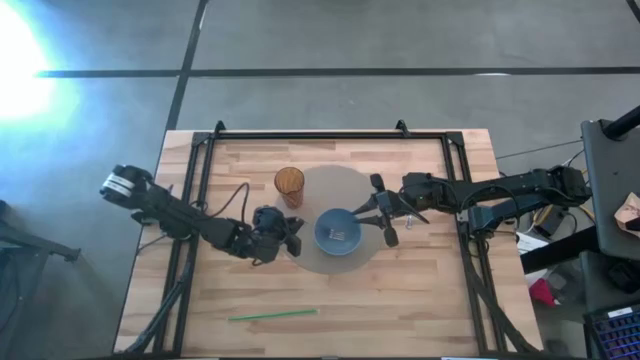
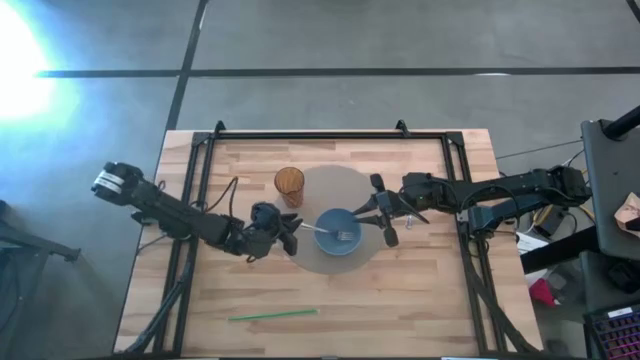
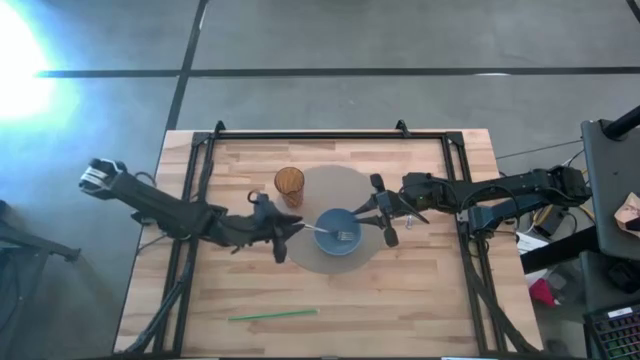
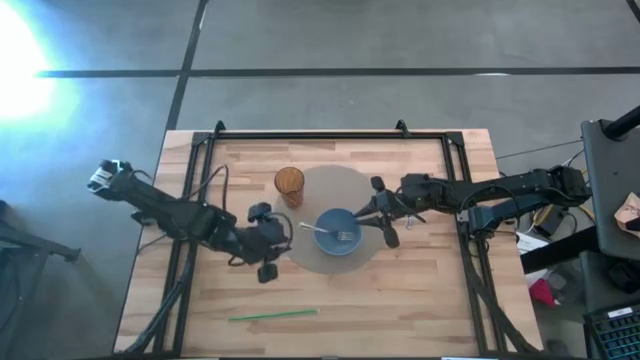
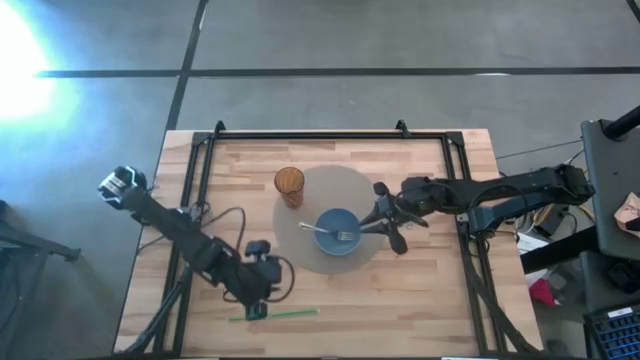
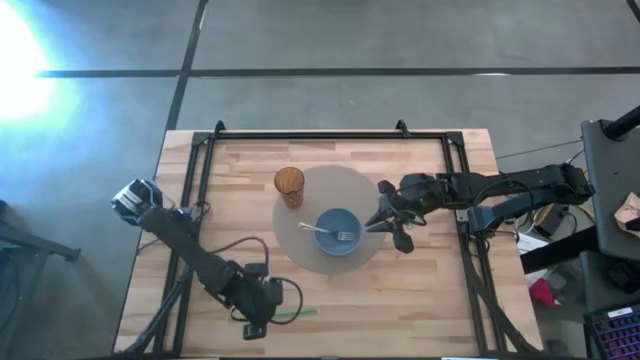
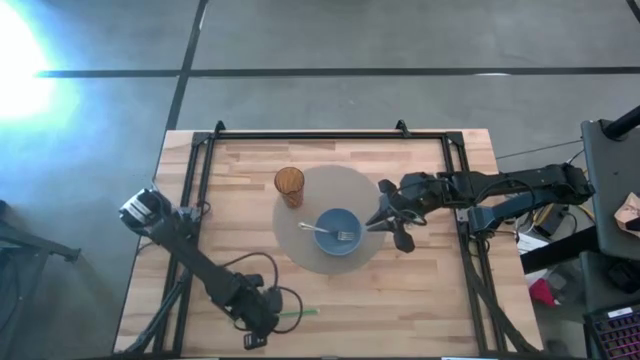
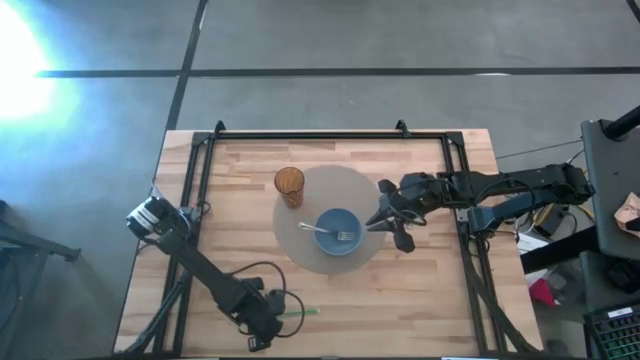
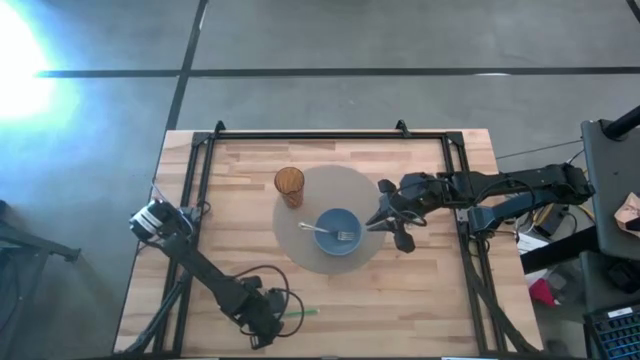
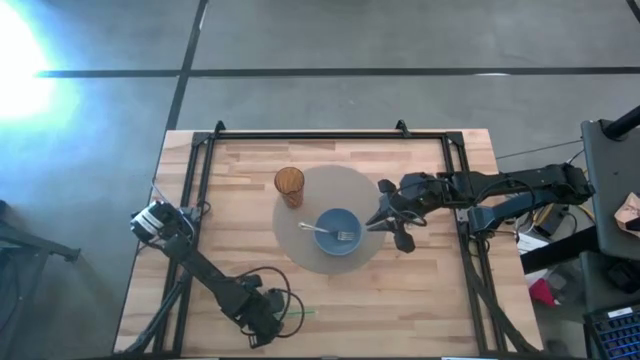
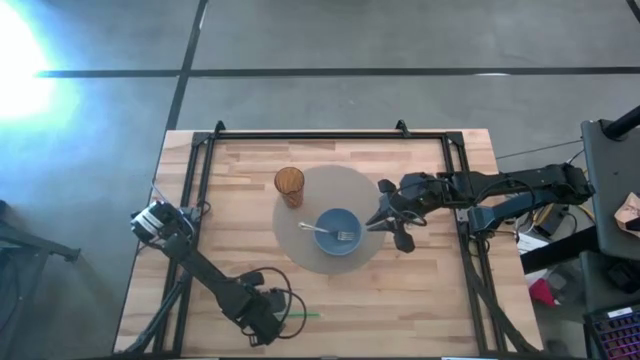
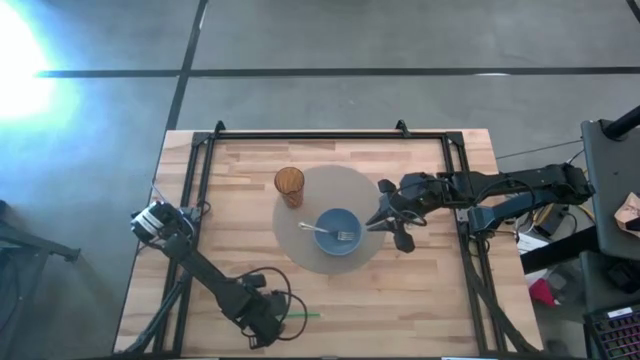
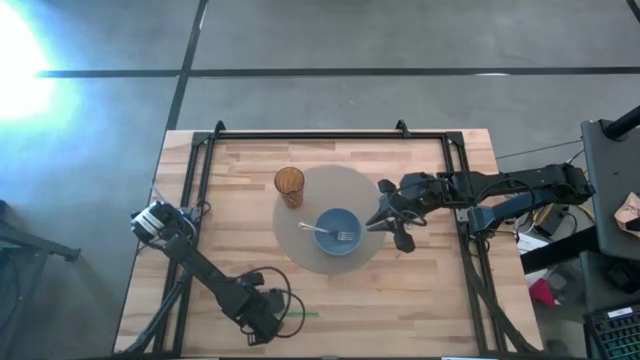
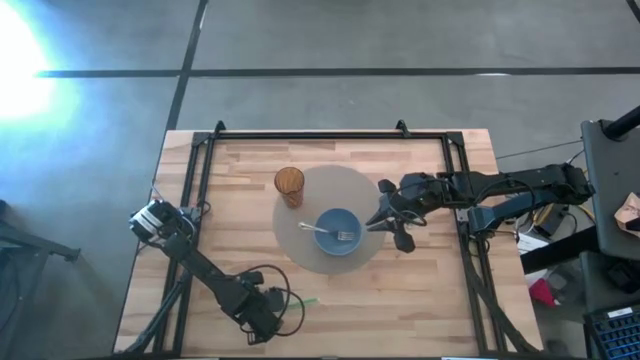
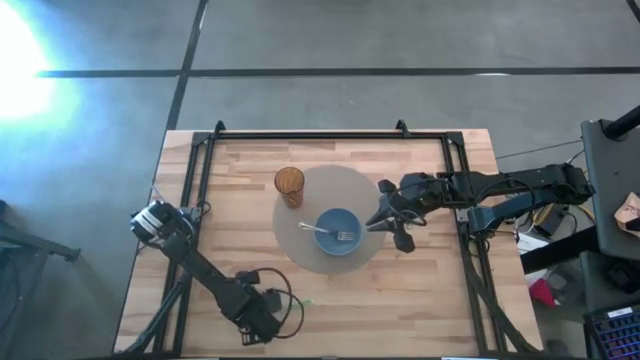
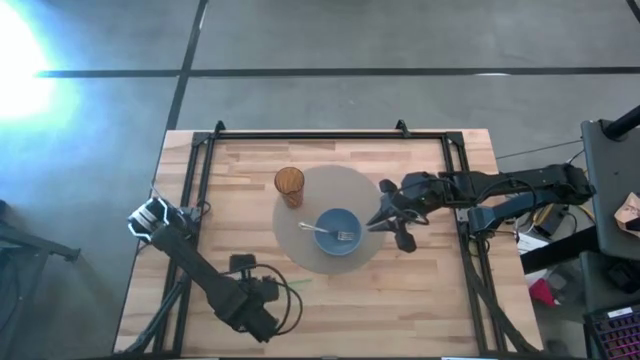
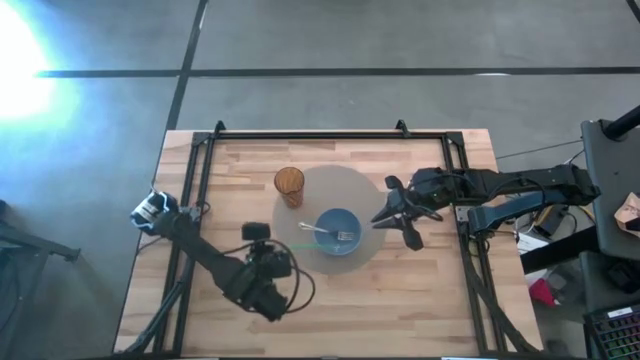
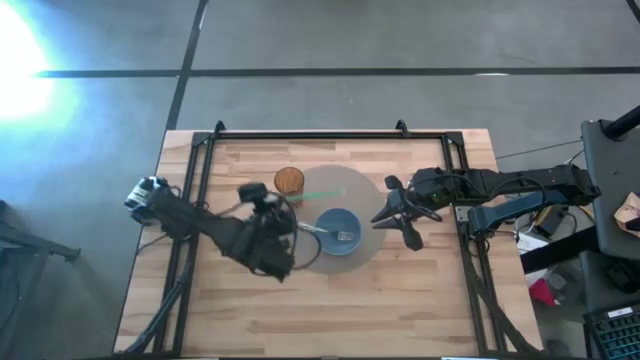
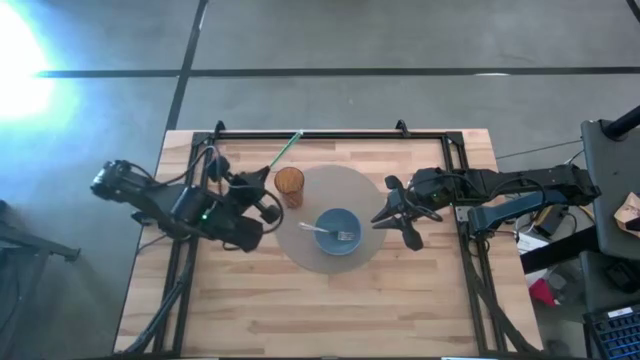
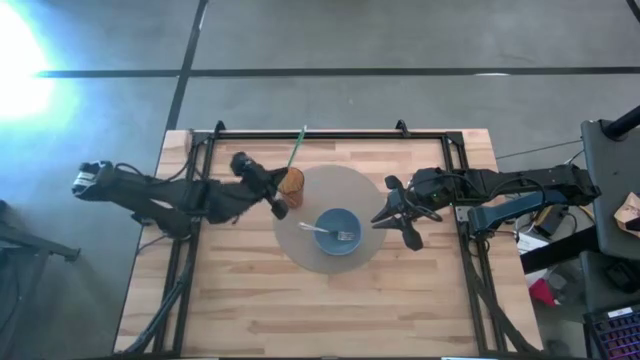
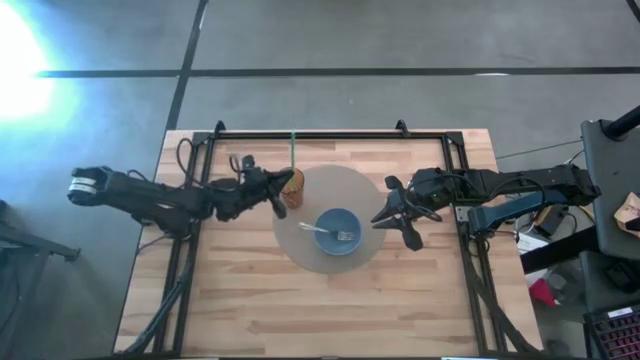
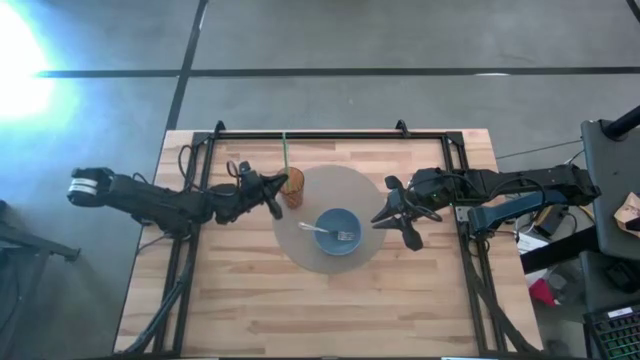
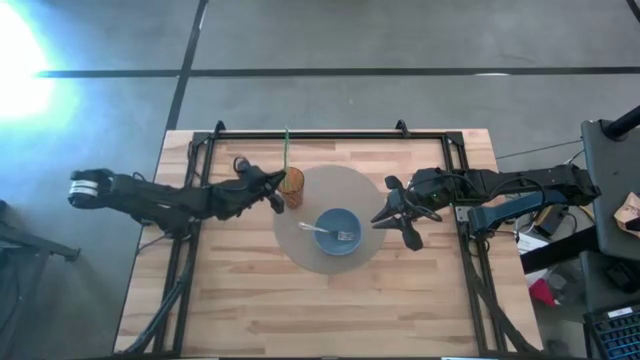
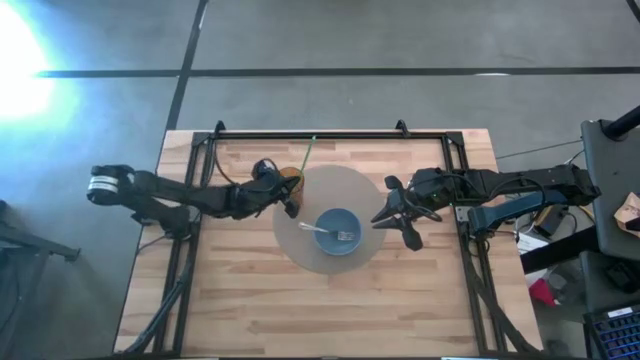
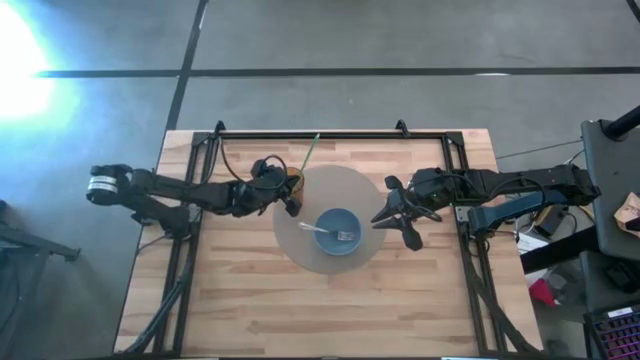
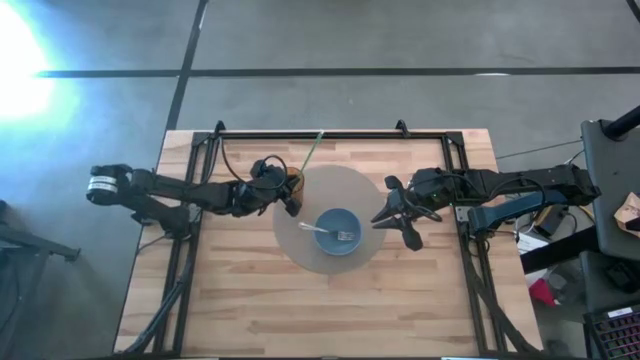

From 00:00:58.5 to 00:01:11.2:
Task: Pick & Place Utensil
Put the straw into the cup

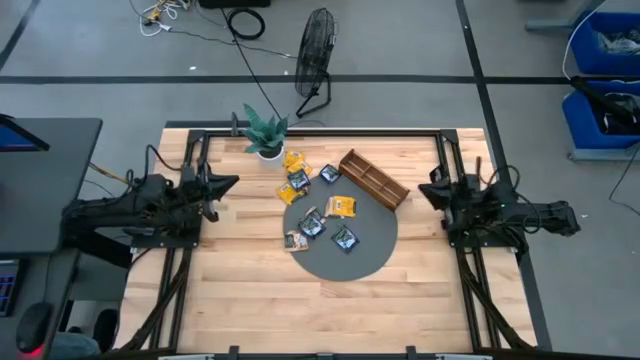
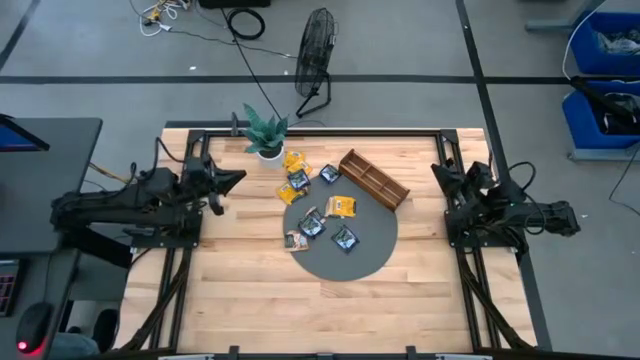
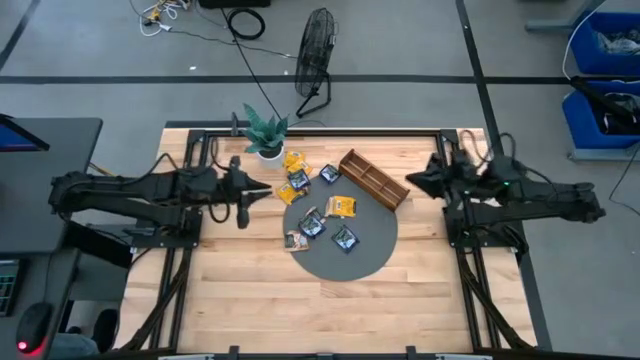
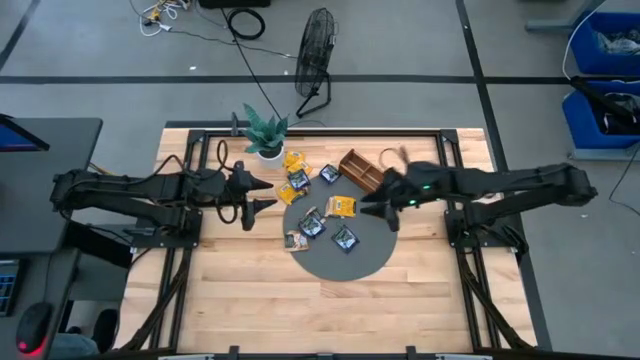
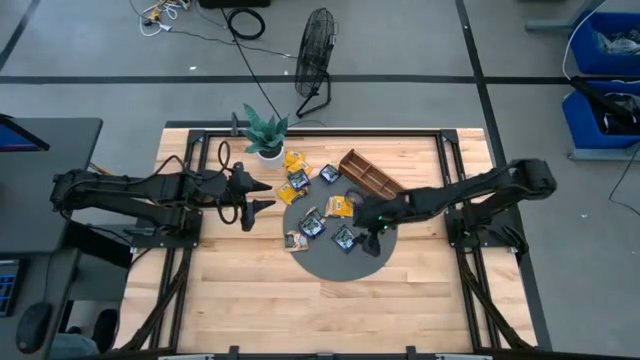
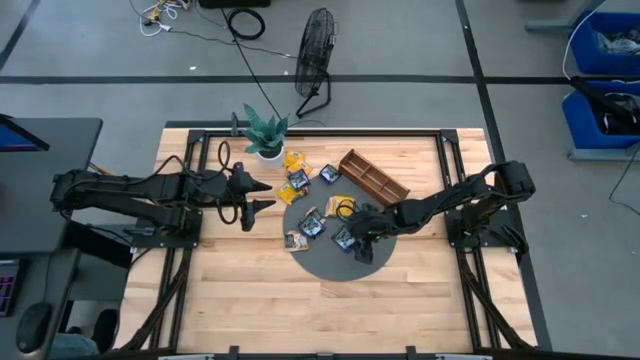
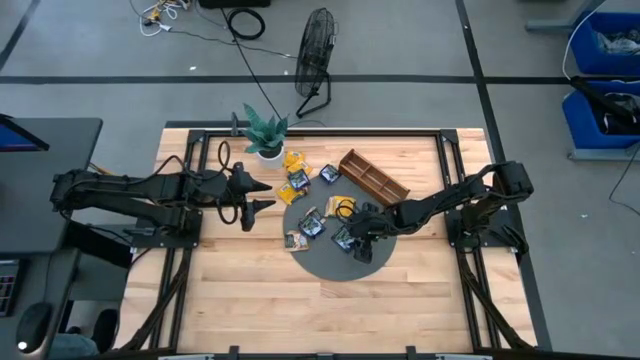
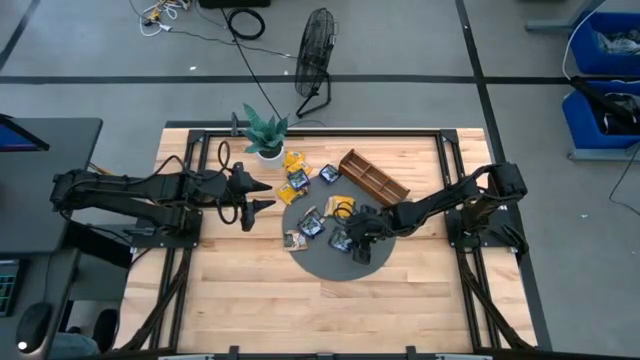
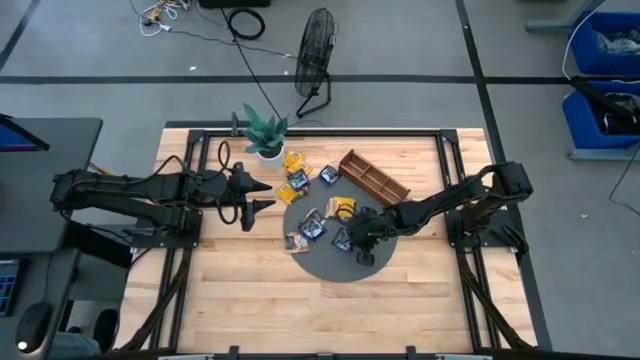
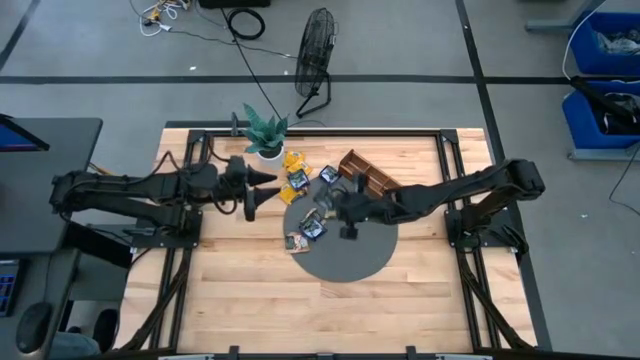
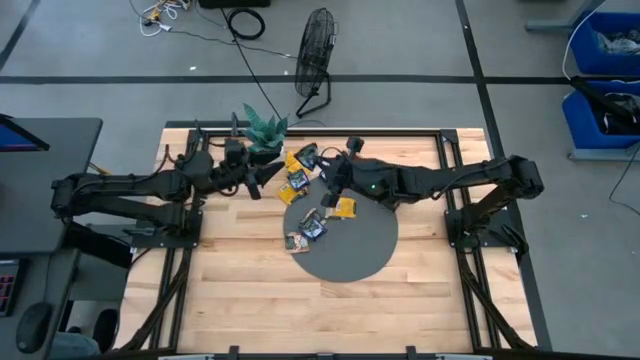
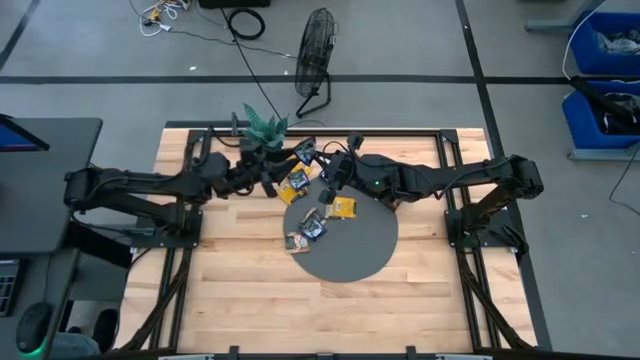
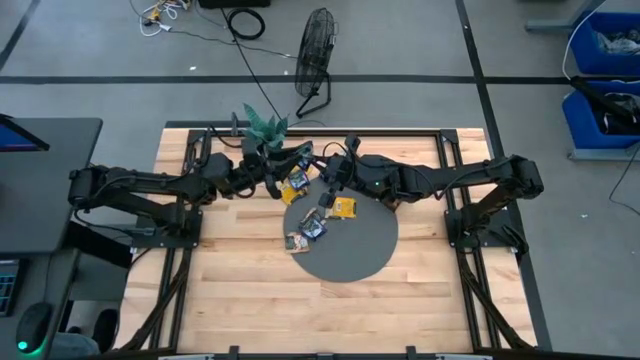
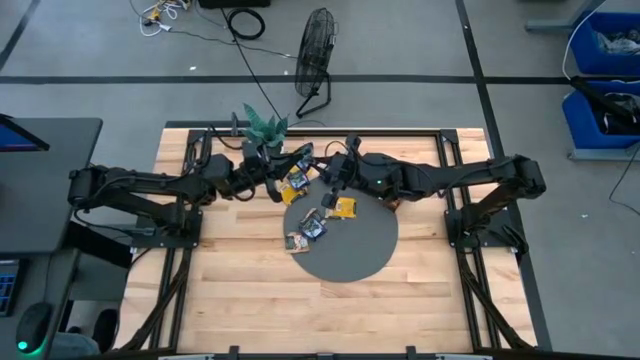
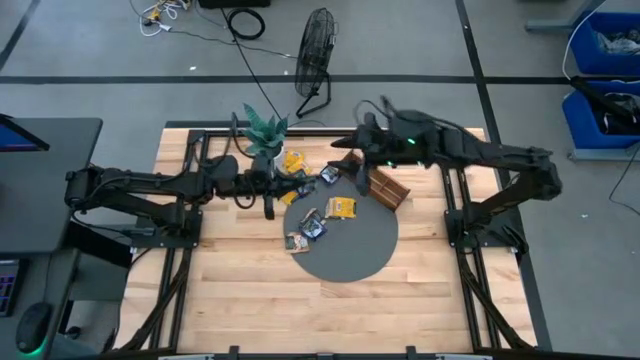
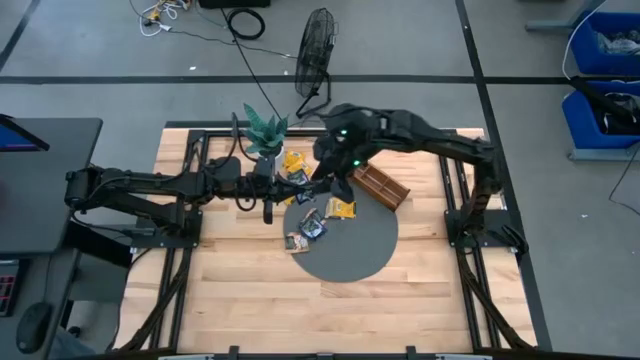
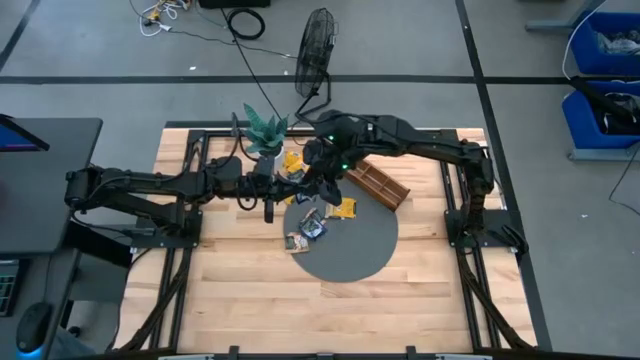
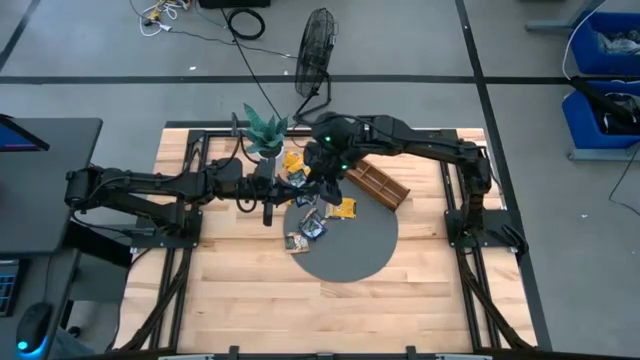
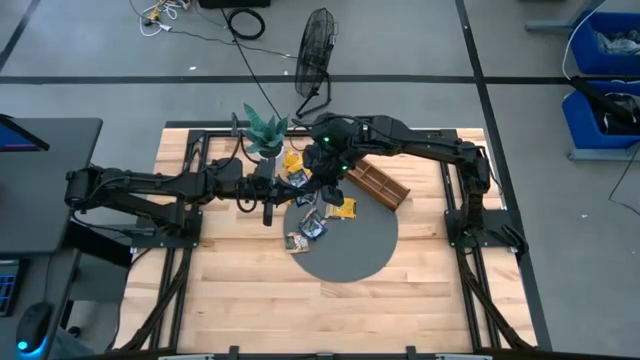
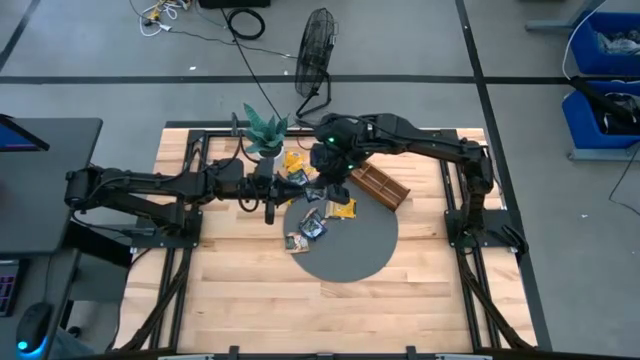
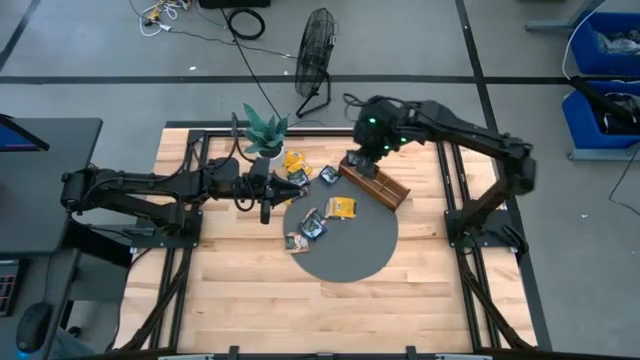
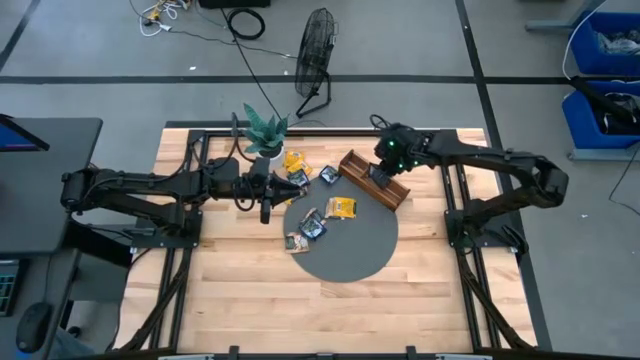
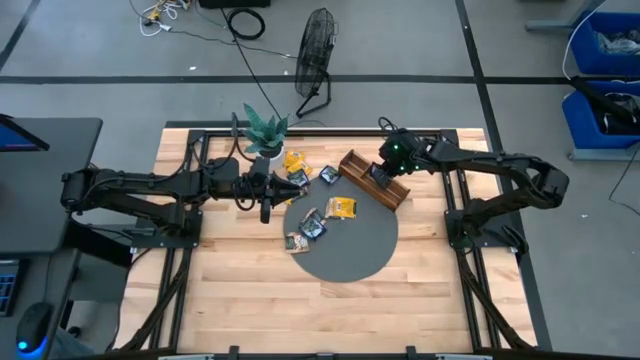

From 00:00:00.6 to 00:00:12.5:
Task: Pick & Place Tea
Put the black tea bag into the middle section of the wooden organizer
